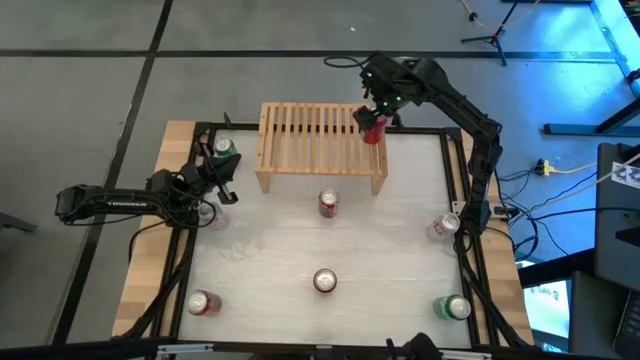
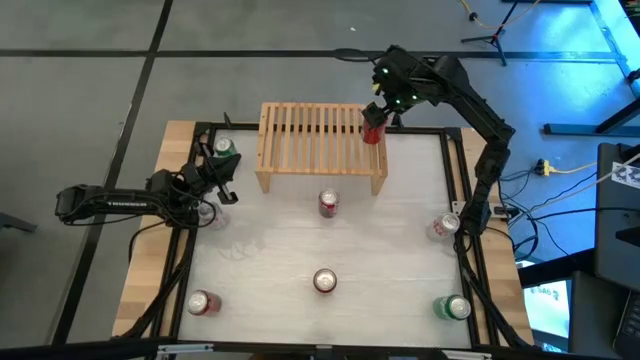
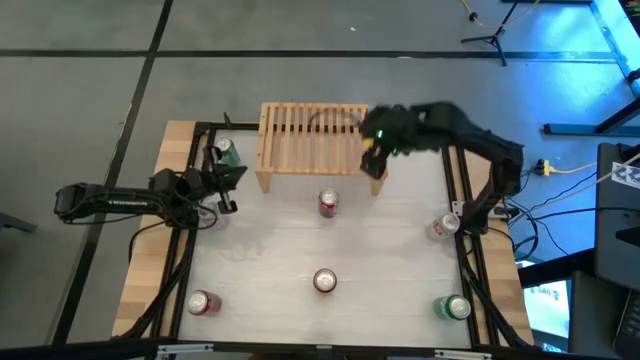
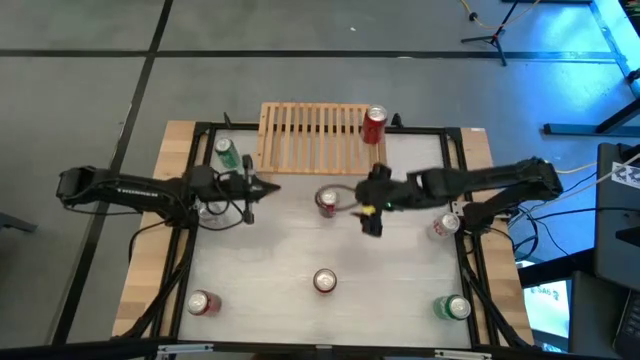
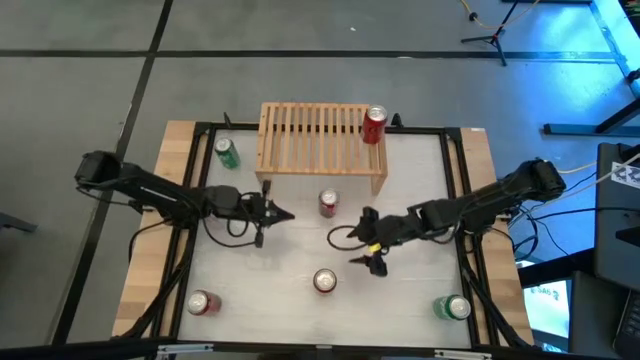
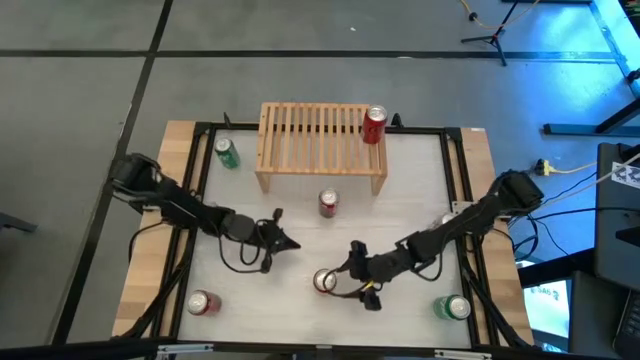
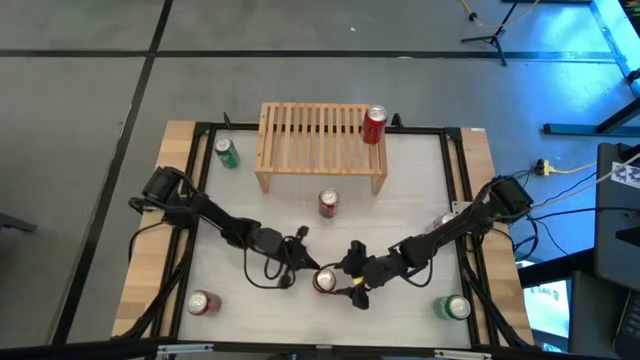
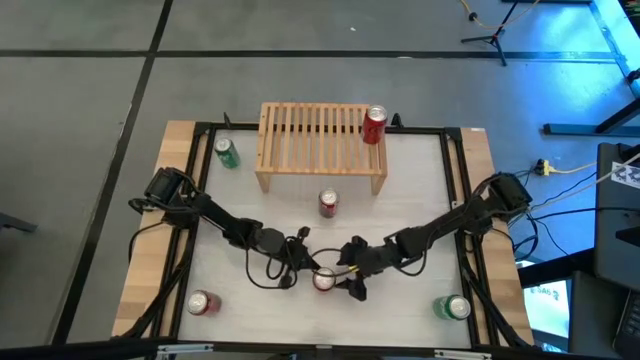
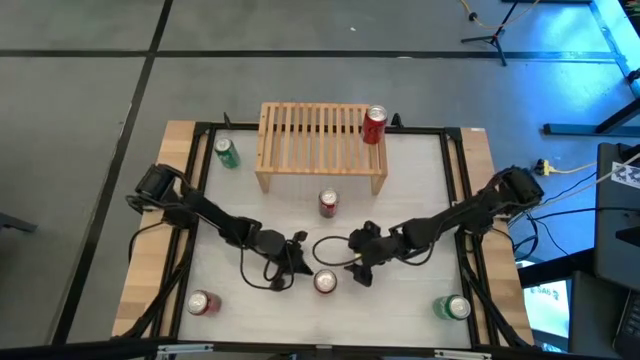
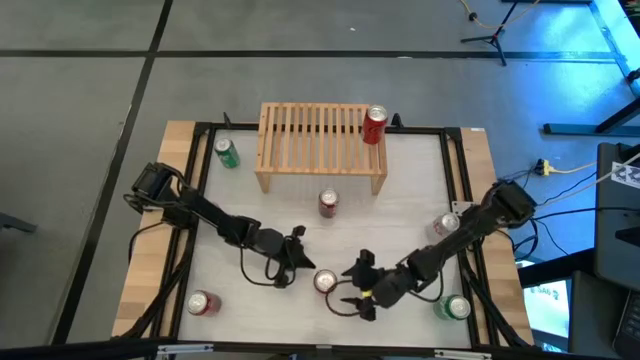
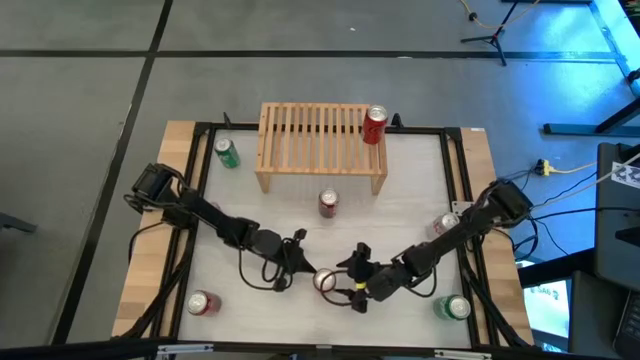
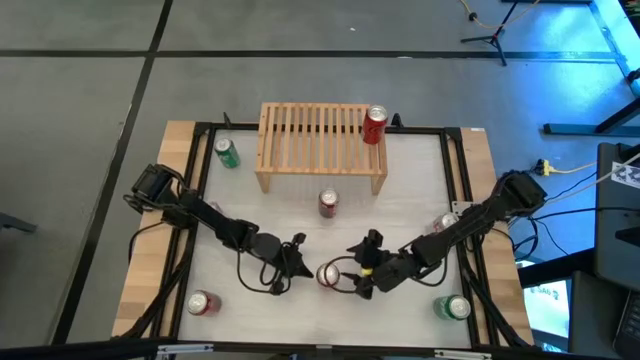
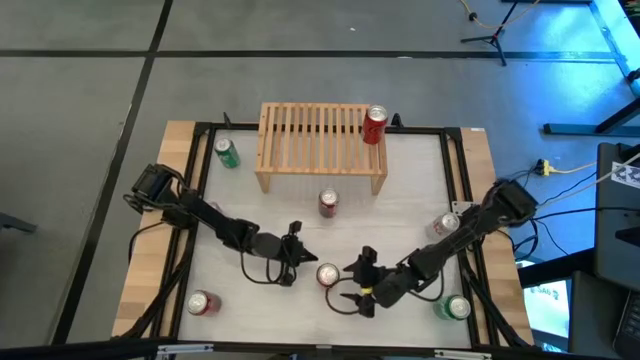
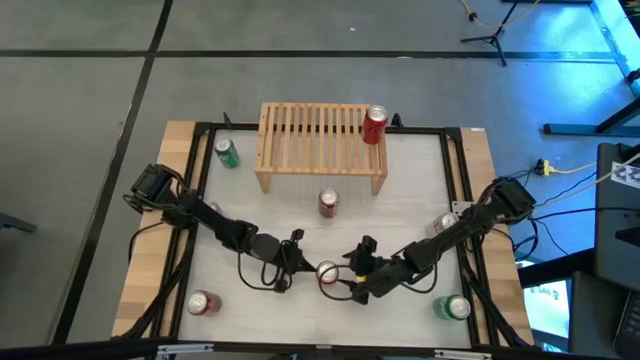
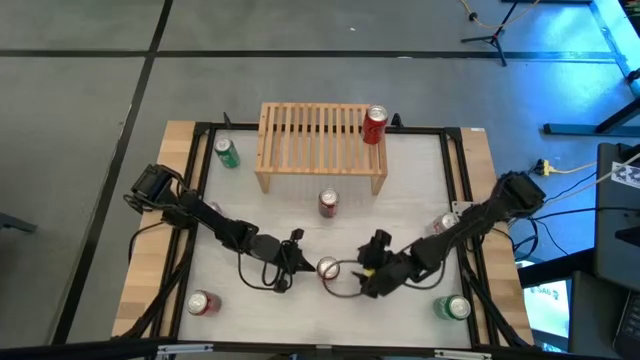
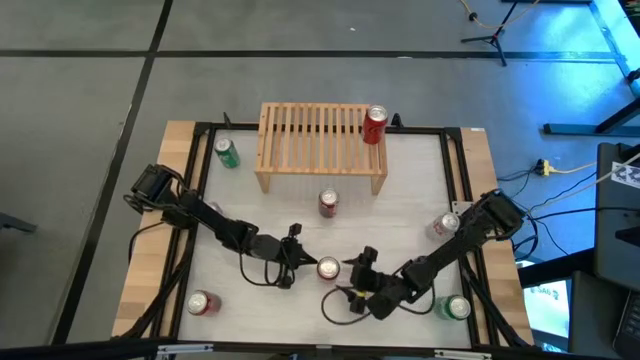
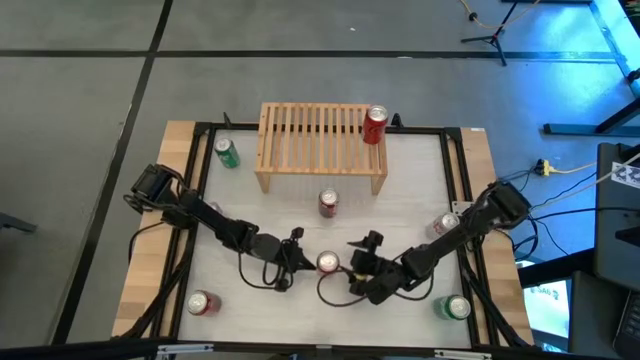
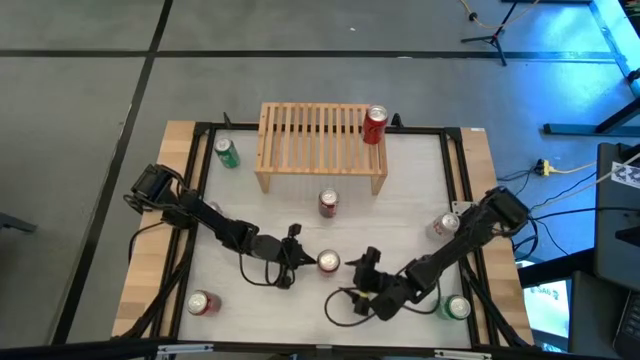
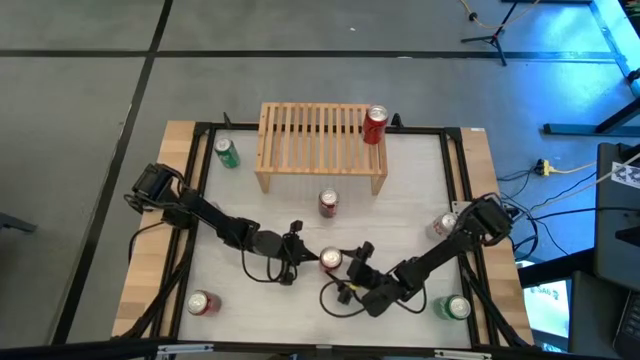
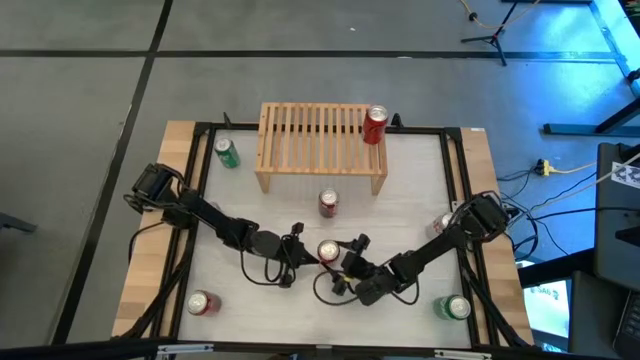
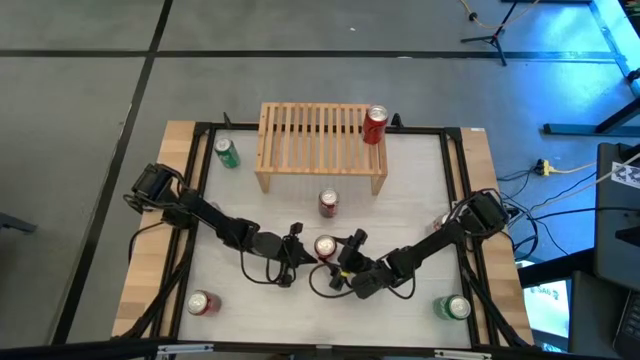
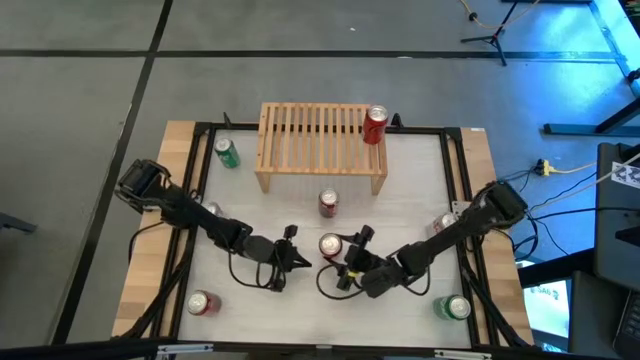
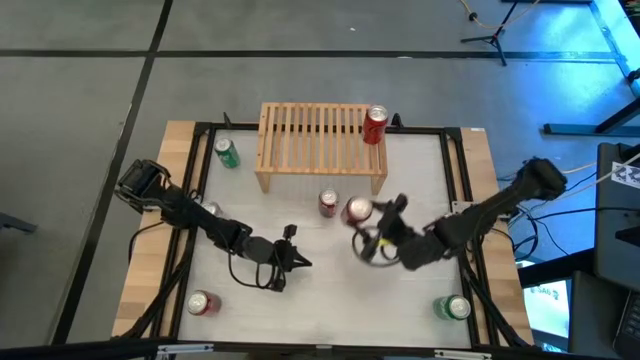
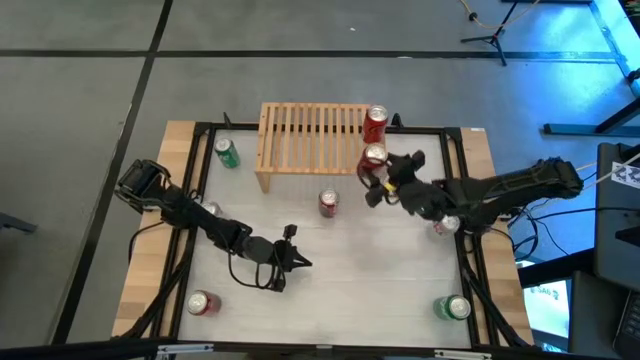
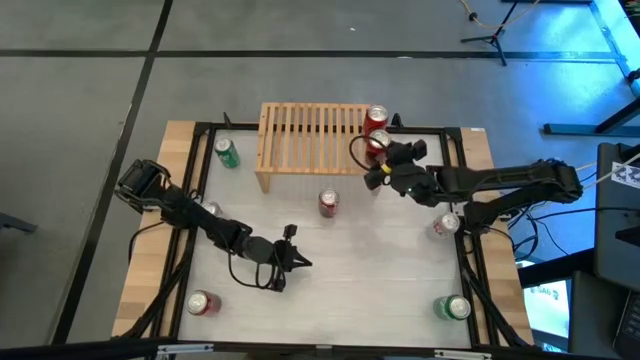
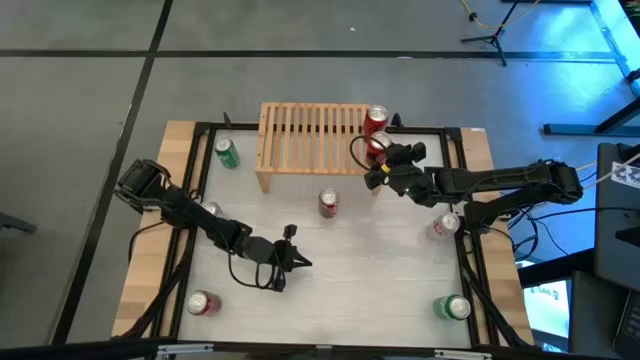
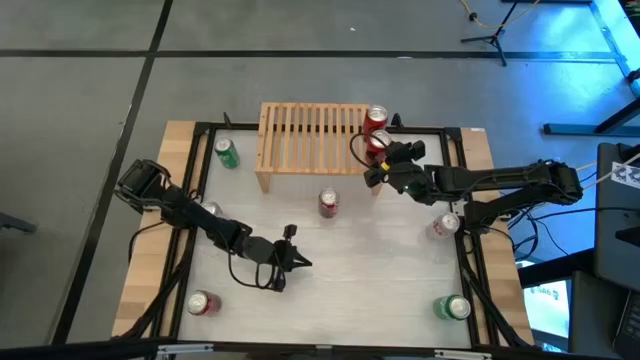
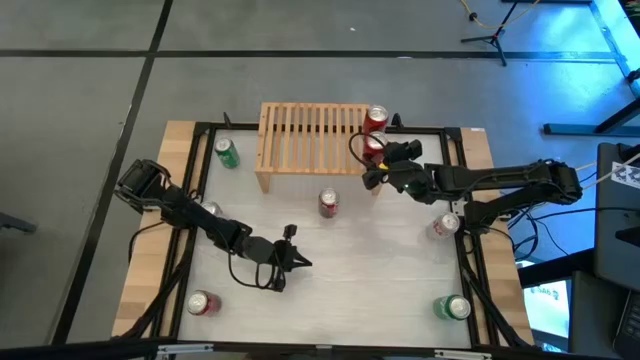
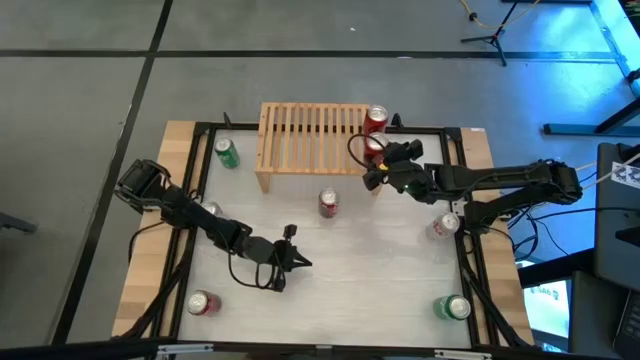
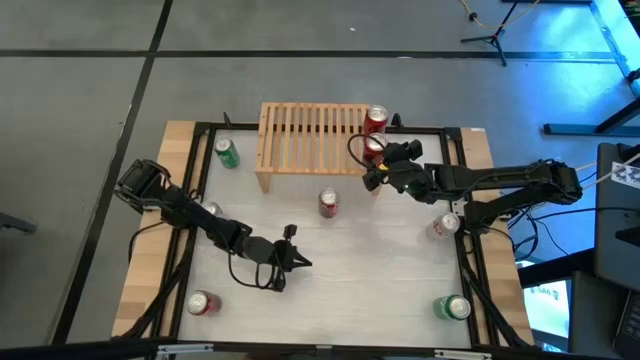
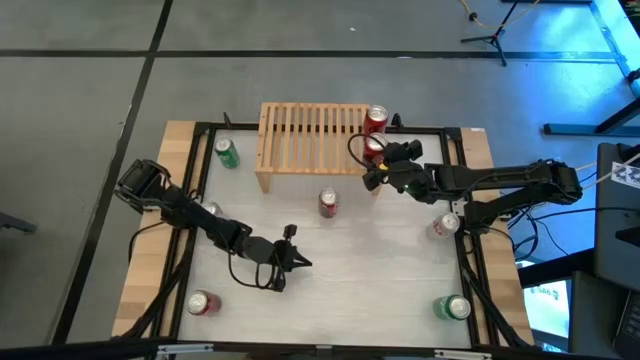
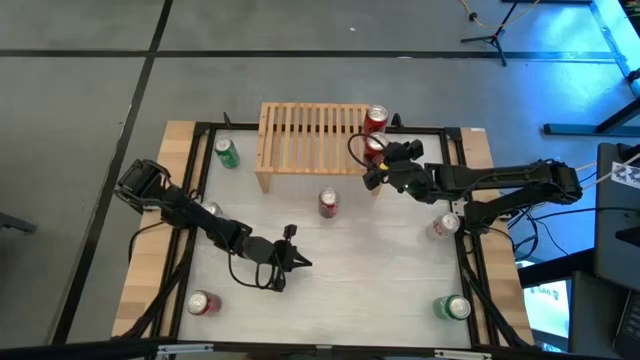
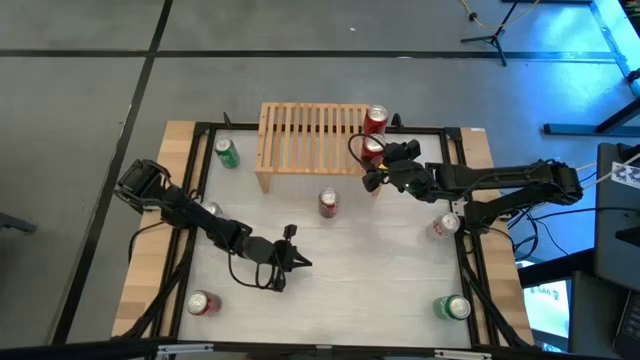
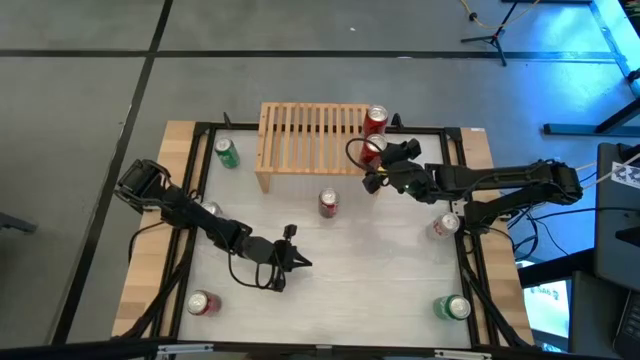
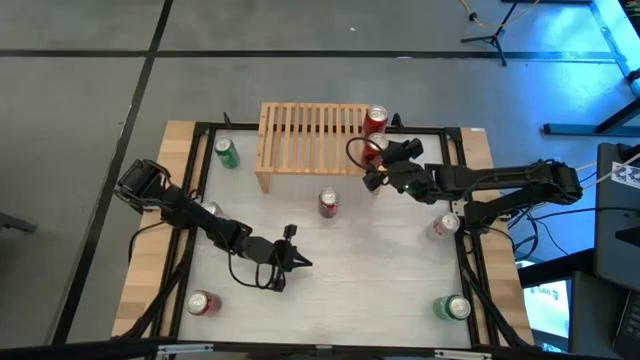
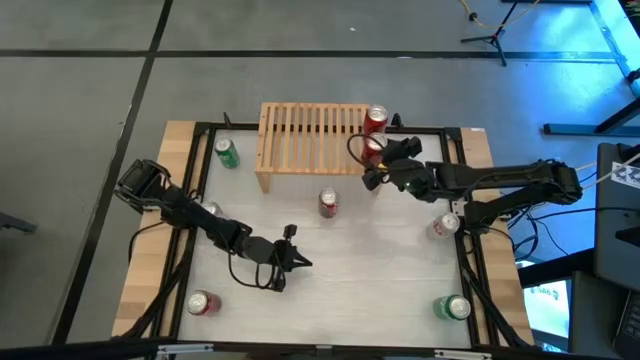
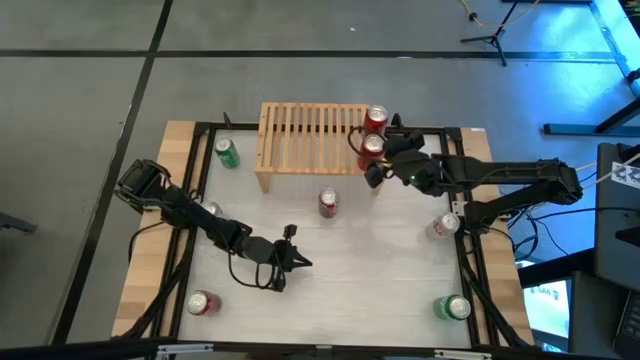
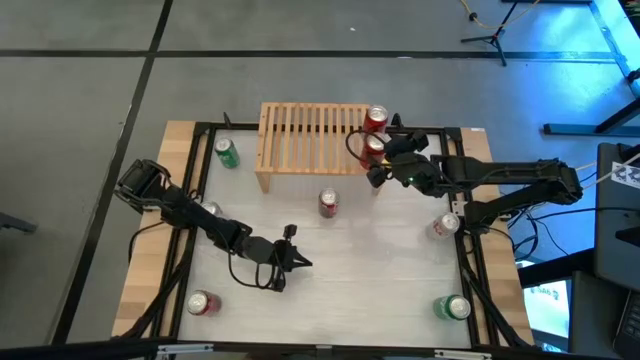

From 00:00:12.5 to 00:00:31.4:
Task: Place canned beverage on shelf
Put the red soda can on the shelf

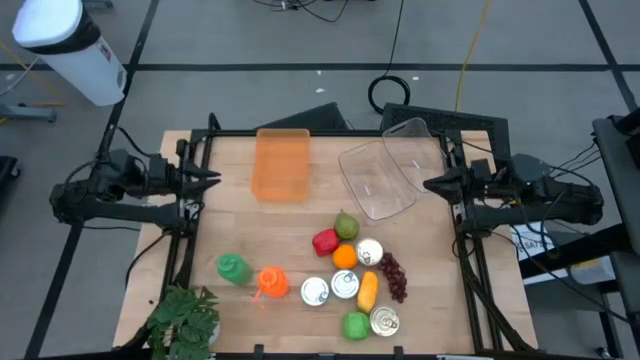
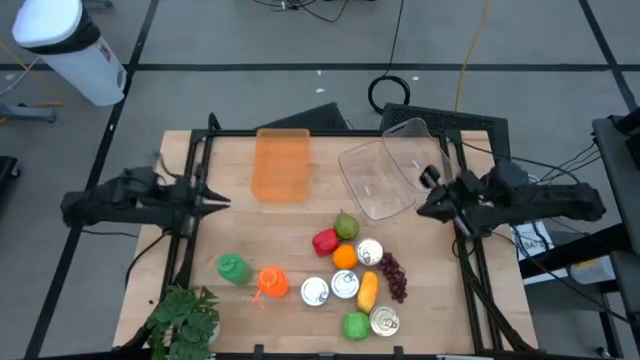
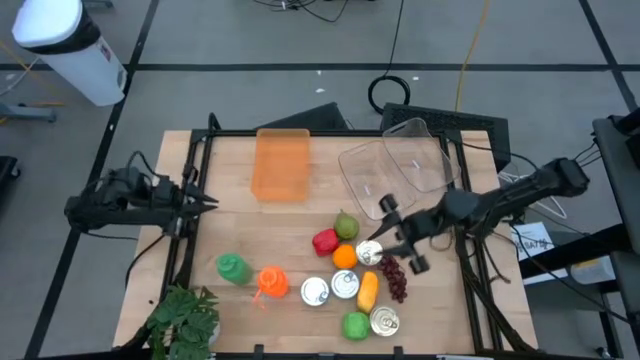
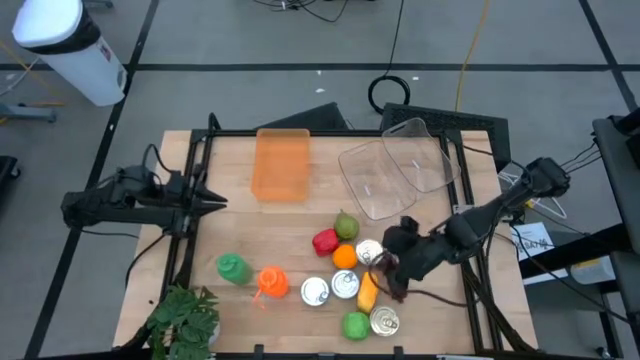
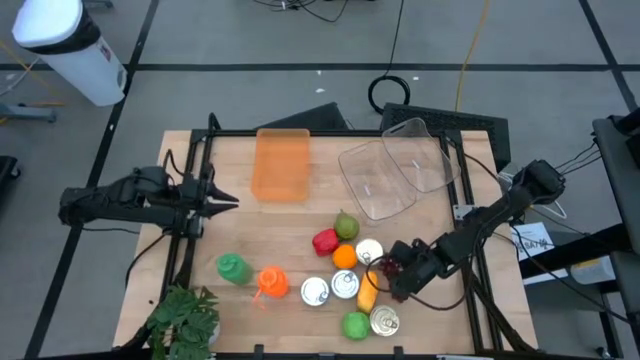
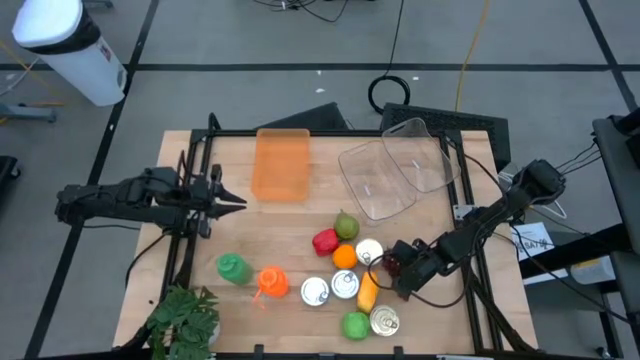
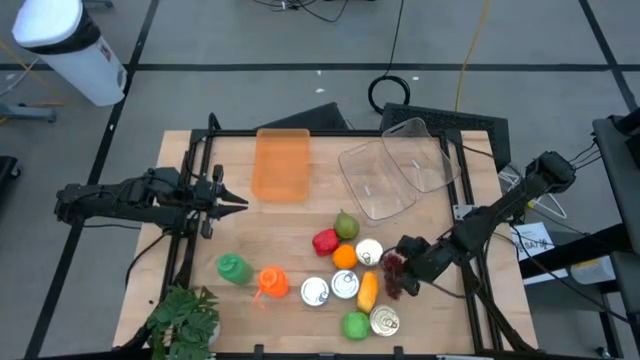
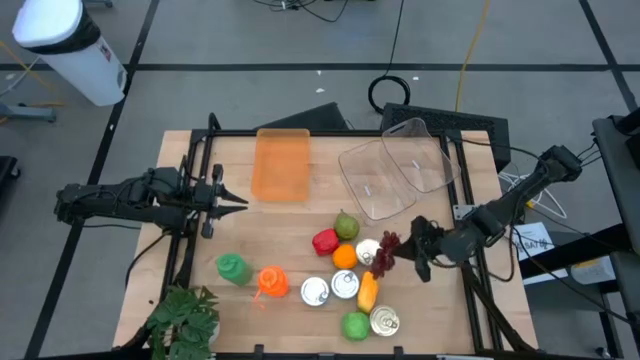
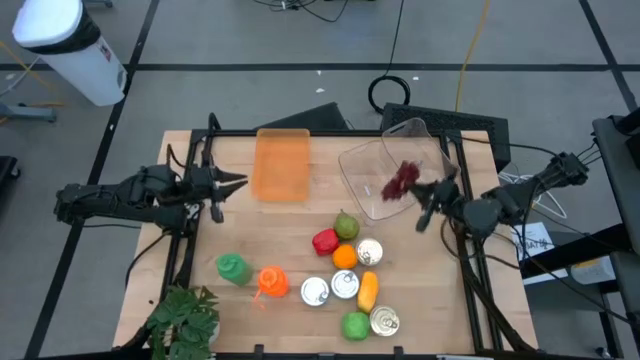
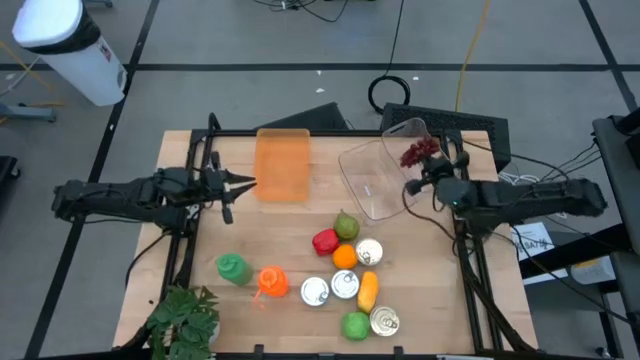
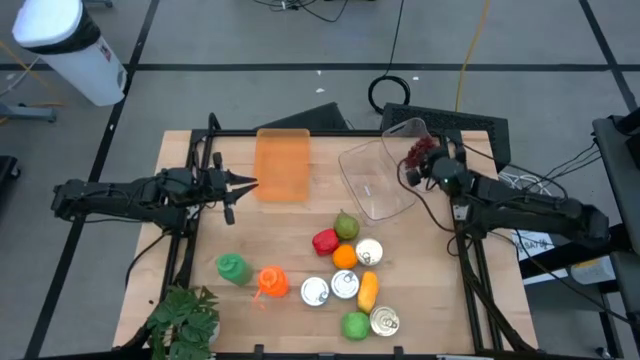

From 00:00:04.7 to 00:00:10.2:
Task: Pick & Place Food Item
Put the red grapes into the right transparent bin
